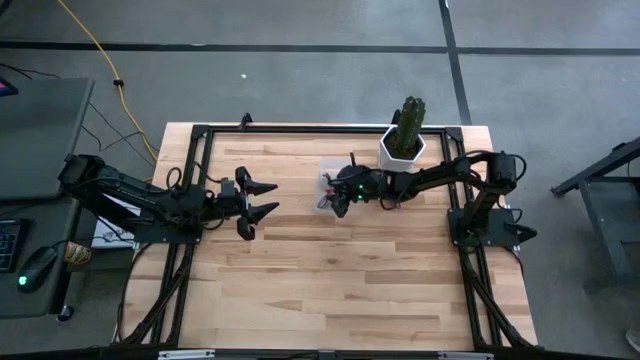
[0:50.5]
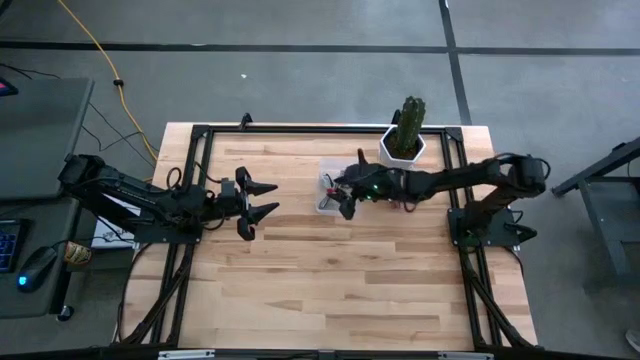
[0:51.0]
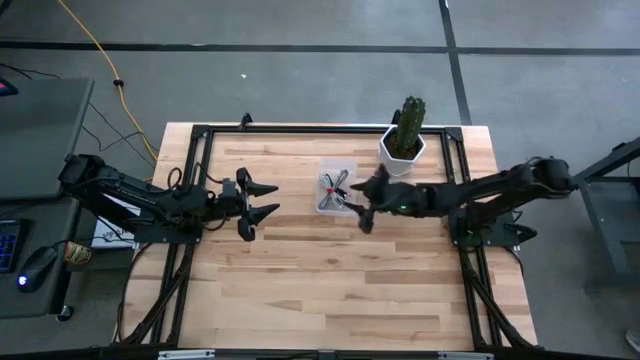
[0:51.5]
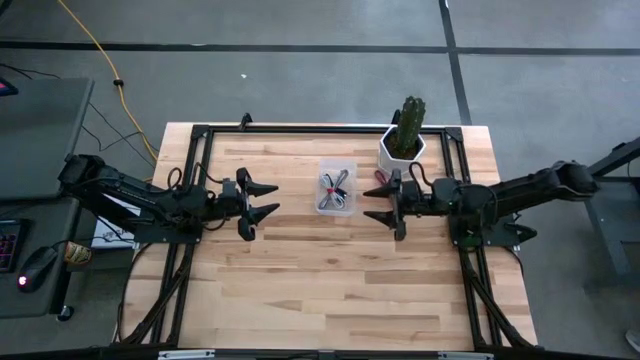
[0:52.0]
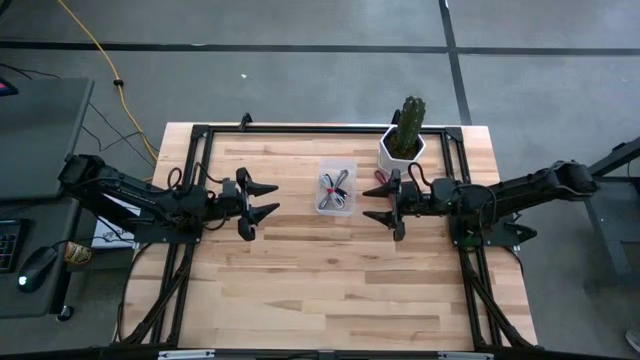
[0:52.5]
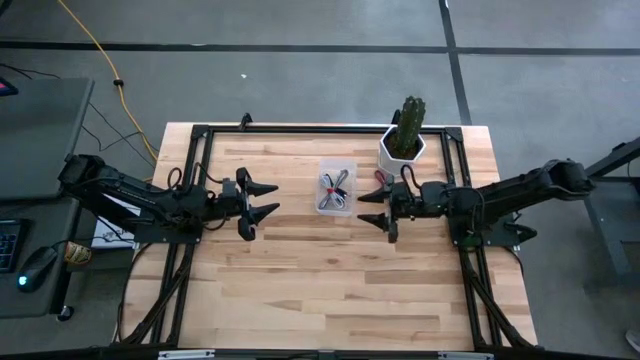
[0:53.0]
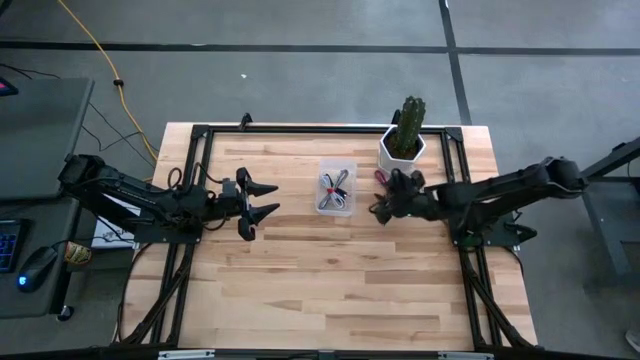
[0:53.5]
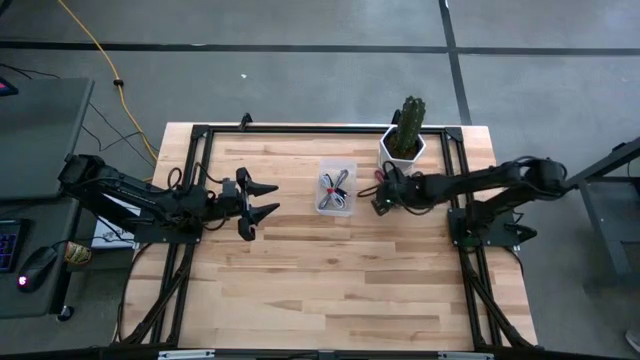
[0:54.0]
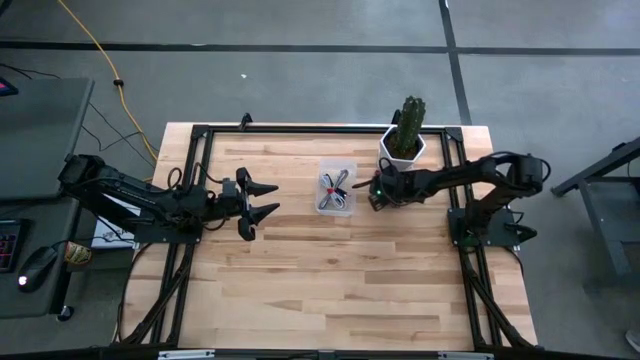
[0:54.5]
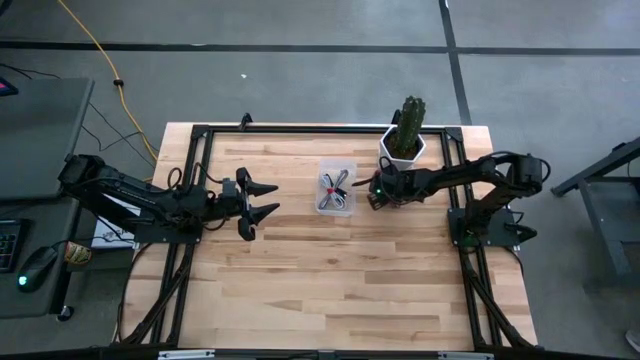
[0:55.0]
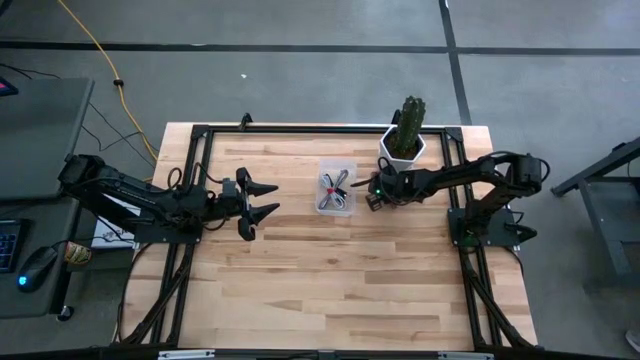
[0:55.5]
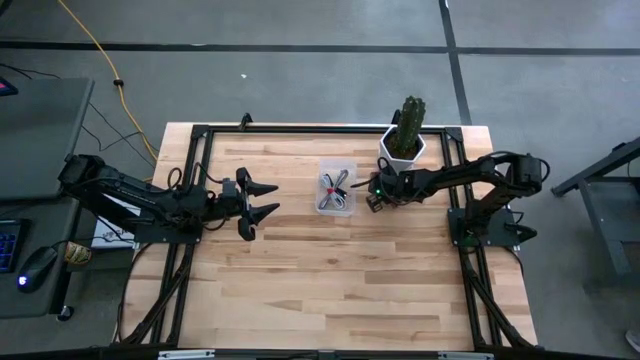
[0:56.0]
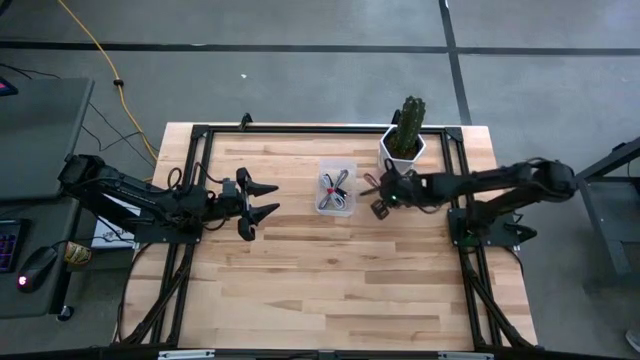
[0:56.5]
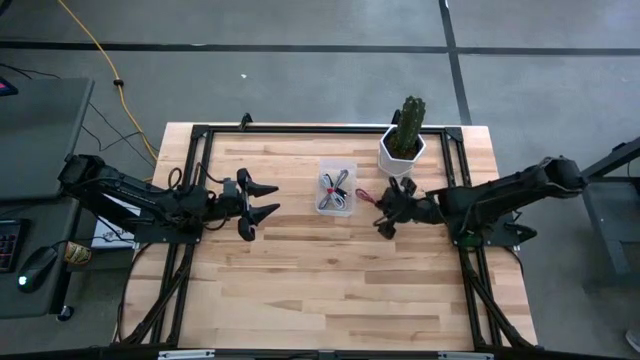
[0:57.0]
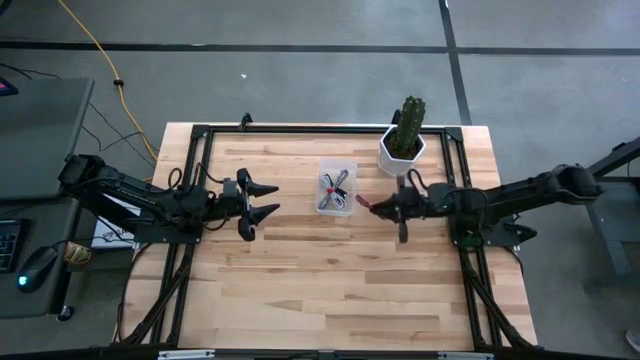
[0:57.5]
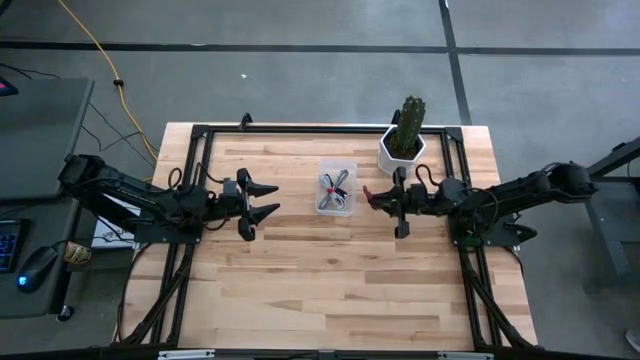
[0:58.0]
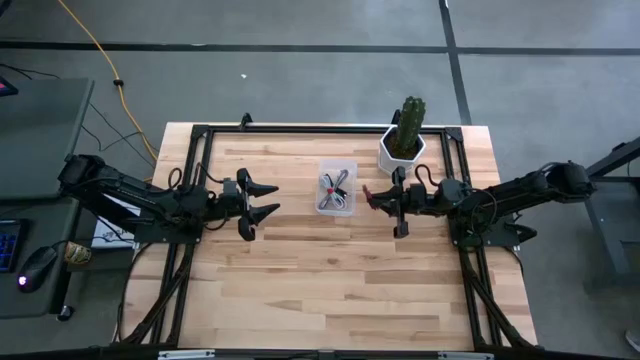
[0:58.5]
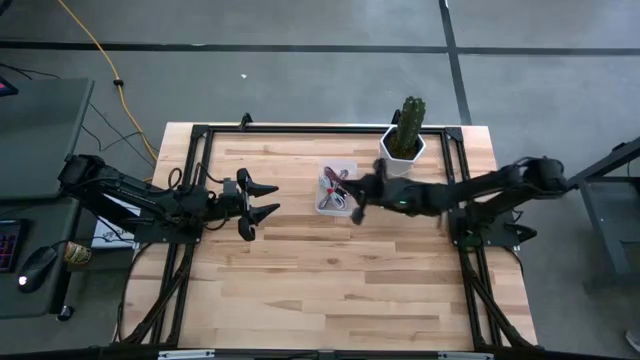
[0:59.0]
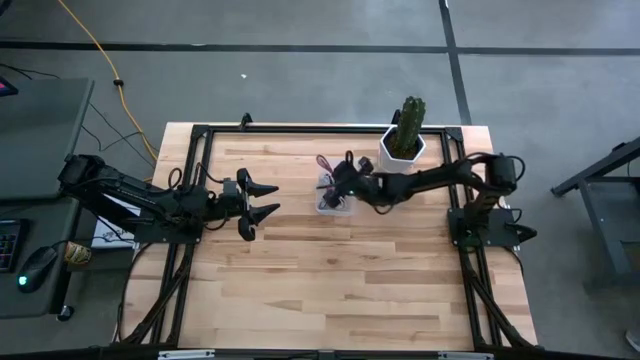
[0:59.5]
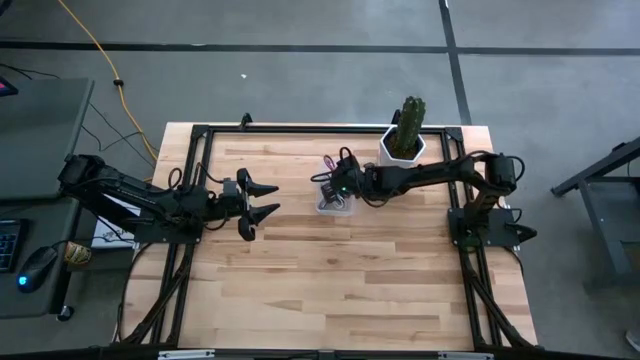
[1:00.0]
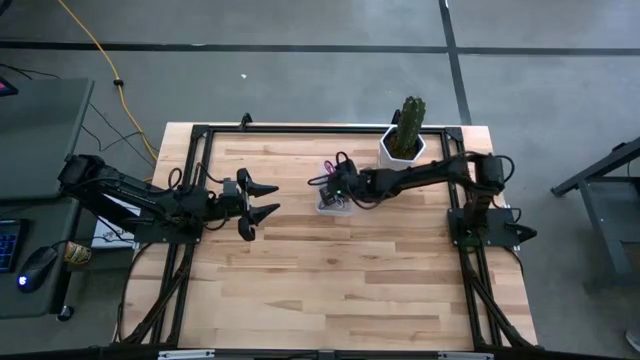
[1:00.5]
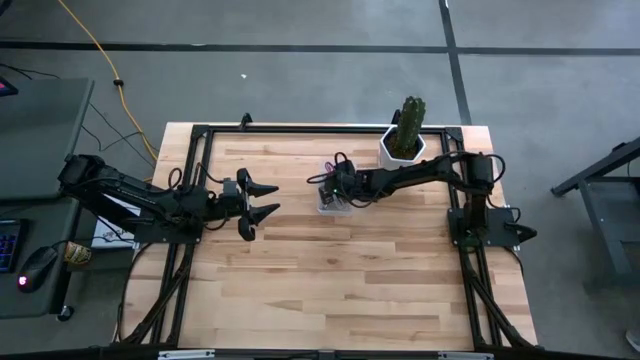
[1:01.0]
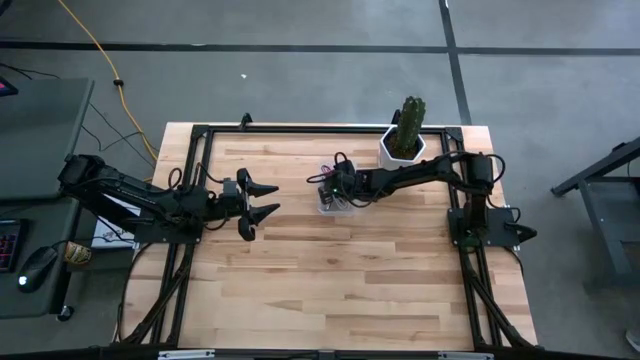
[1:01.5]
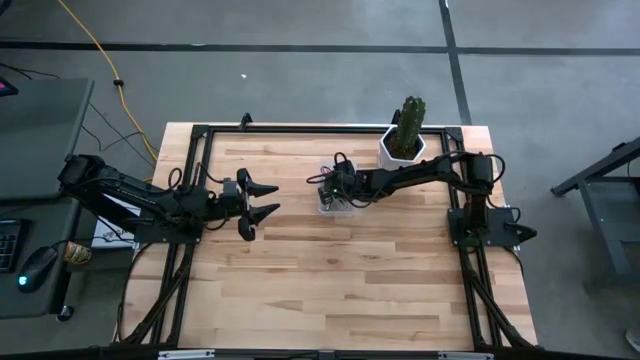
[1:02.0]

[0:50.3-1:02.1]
Task: Pick and place USB-C Cables
Put the black pink charger cable into the transparent bin

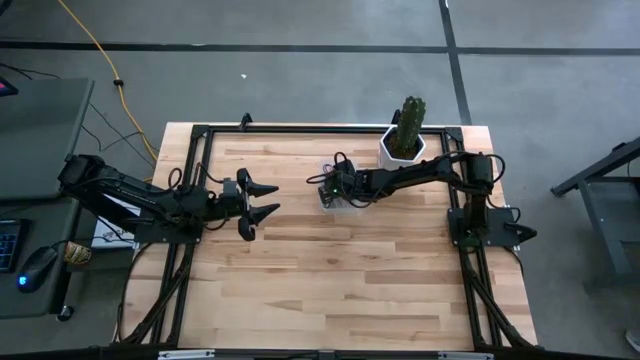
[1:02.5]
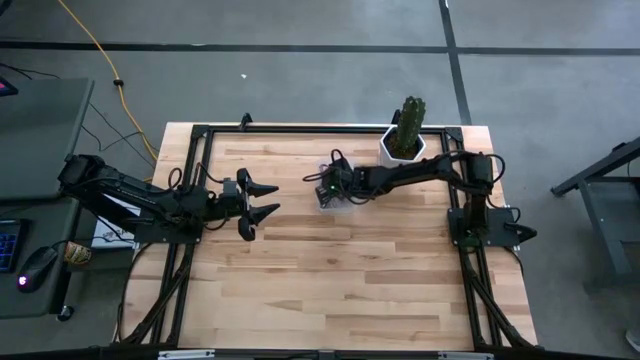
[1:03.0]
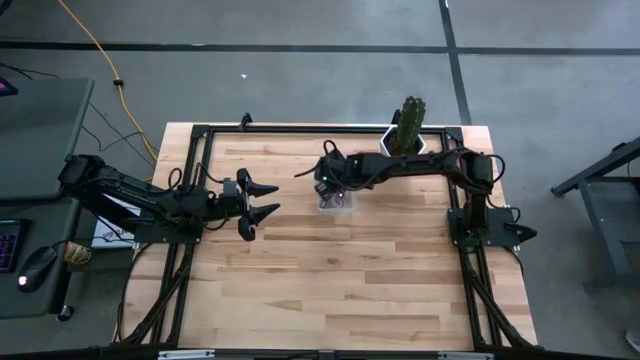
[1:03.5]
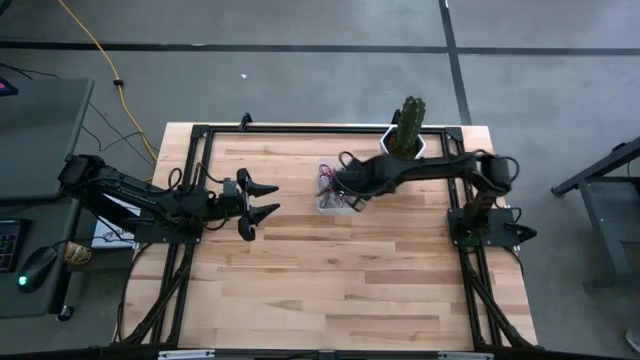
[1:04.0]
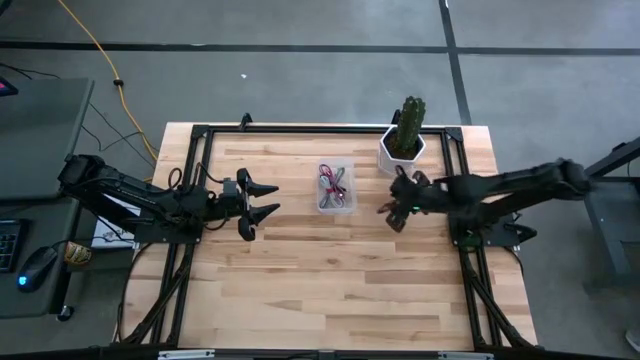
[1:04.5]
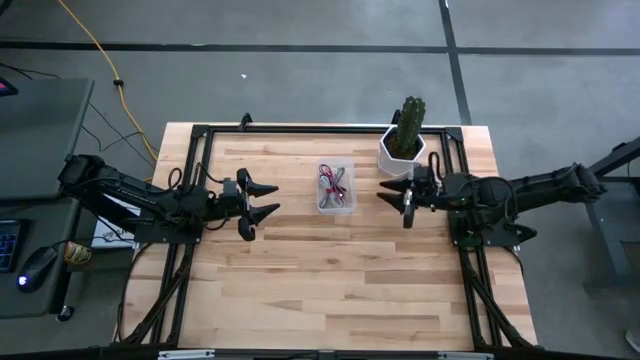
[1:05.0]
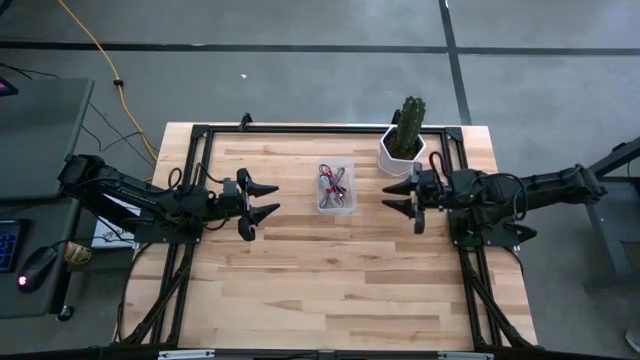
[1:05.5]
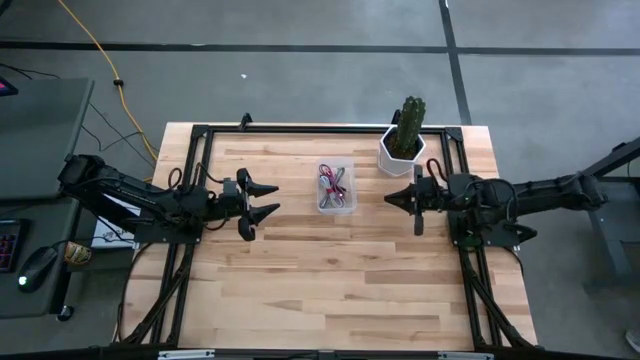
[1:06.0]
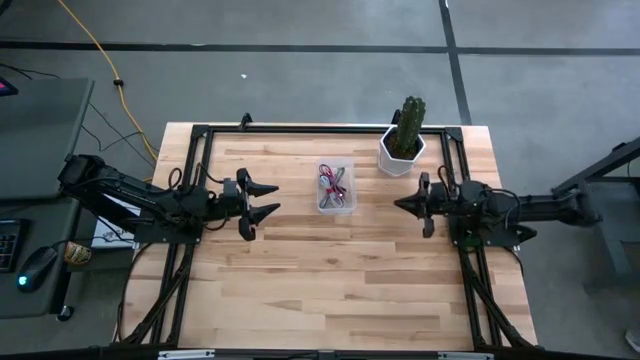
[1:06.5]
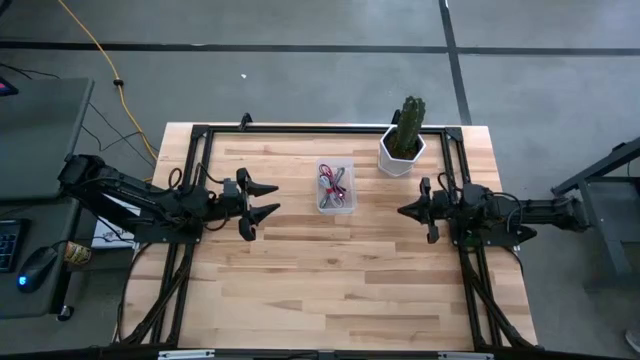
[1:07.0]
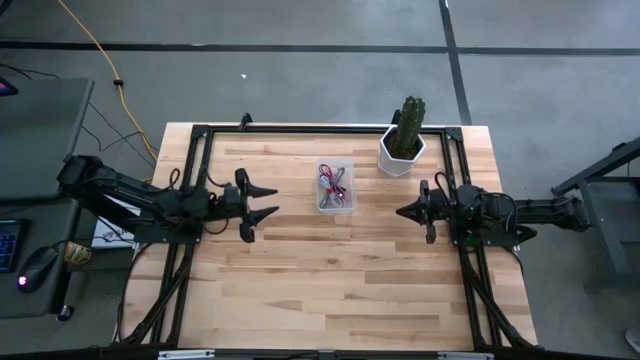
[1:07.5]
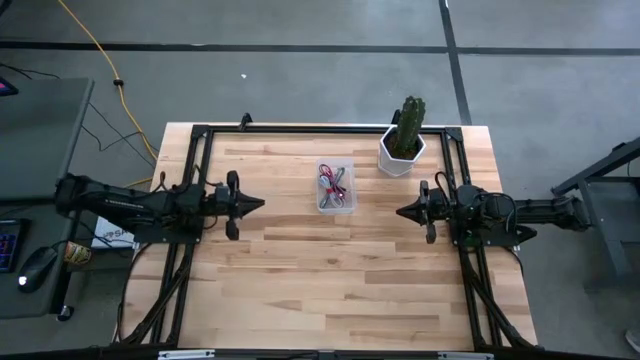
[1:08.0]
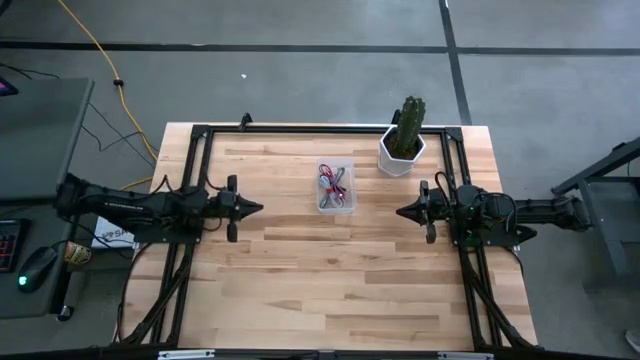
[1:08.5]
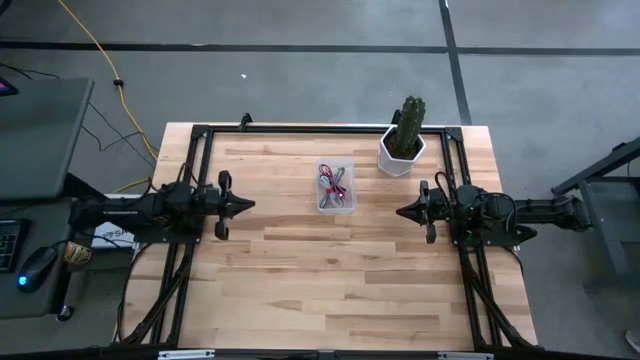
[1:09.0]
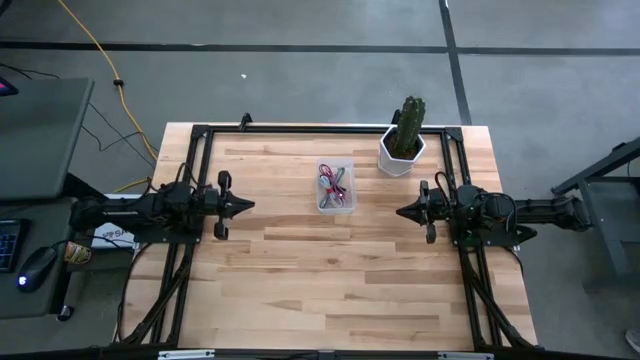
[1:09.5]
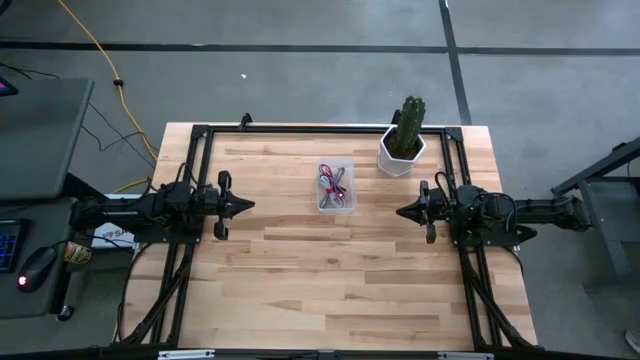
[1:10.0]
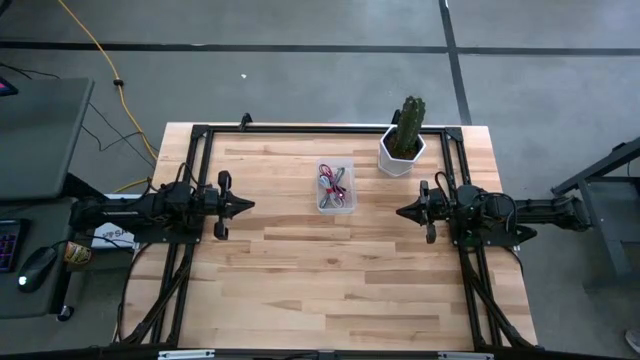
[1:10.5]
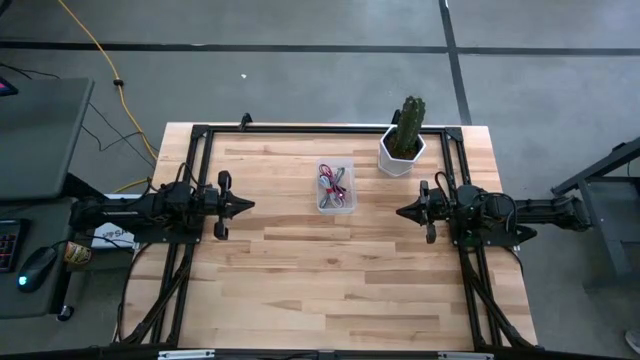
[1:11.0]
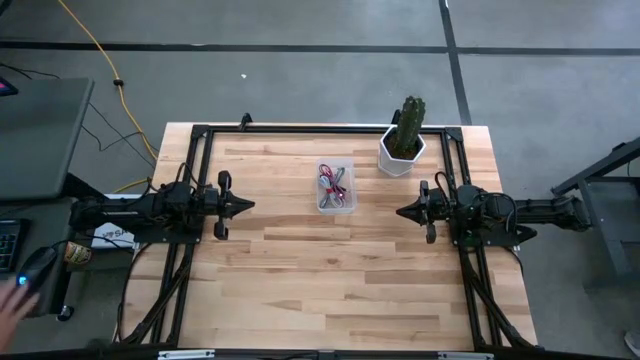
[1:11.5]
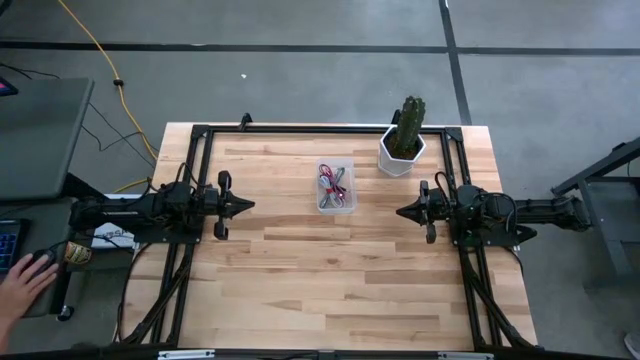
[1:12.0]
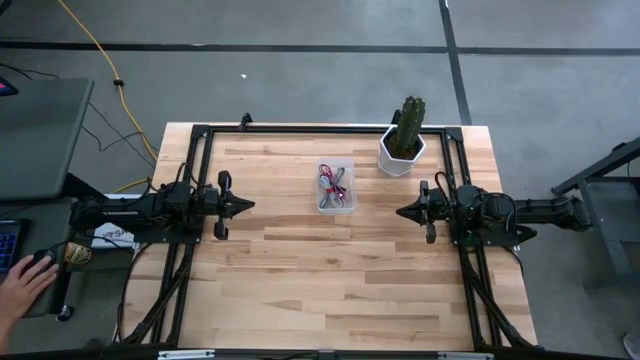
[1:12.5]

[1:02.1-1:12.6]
Return to Home Position
